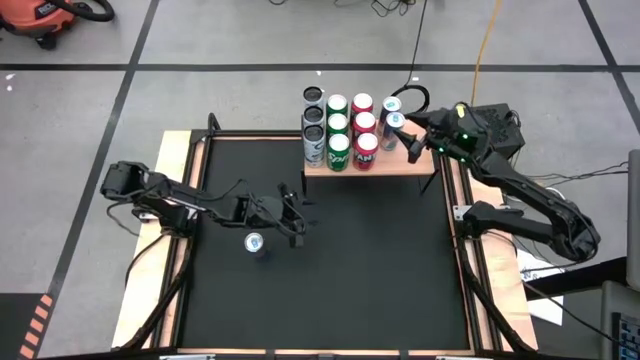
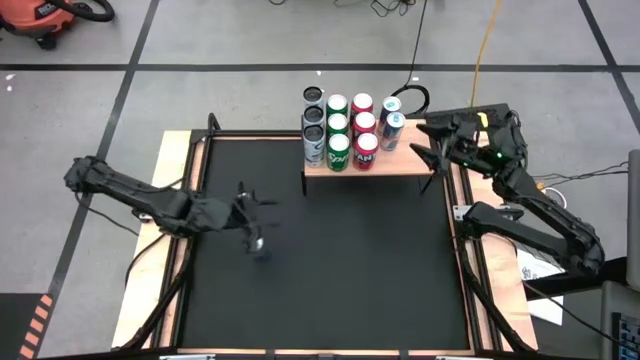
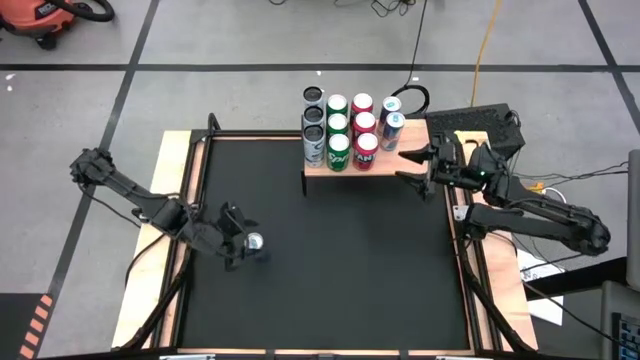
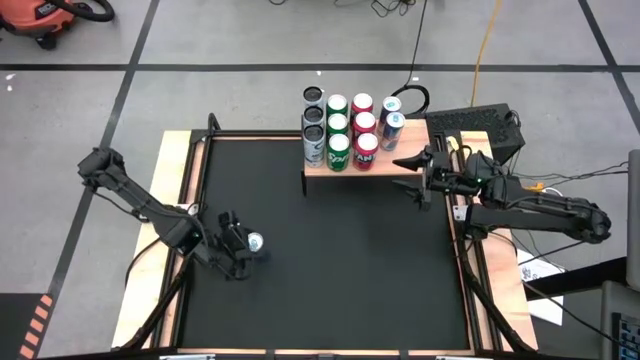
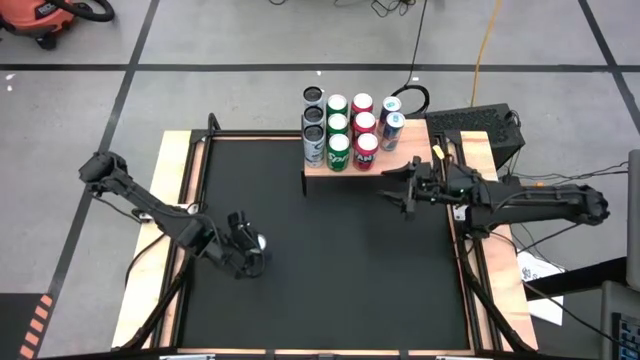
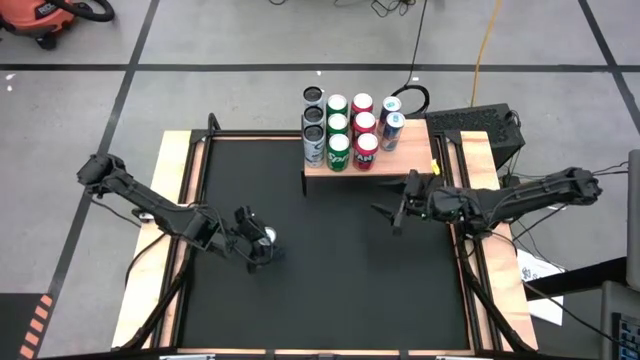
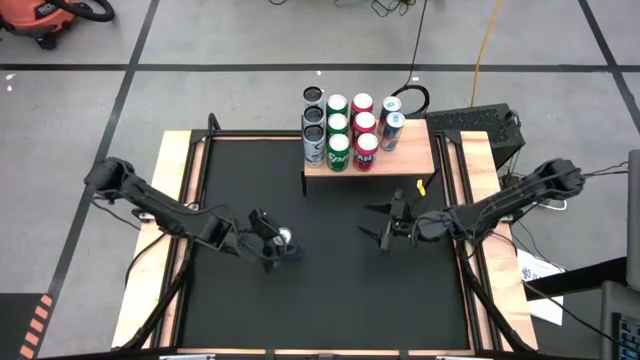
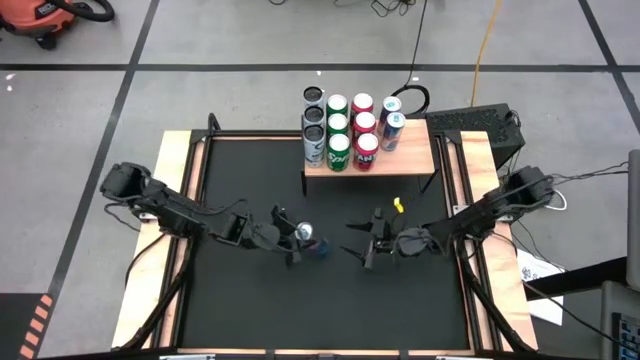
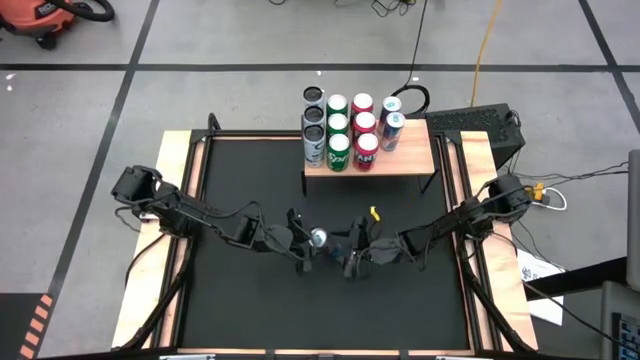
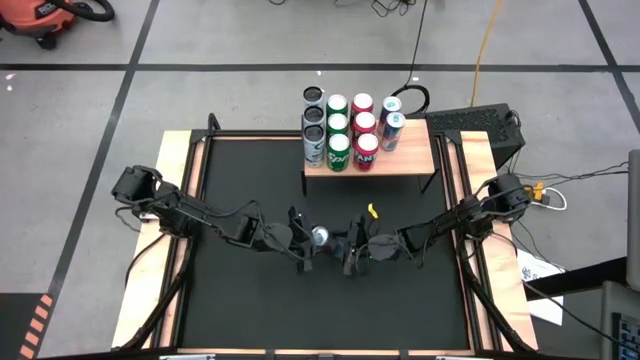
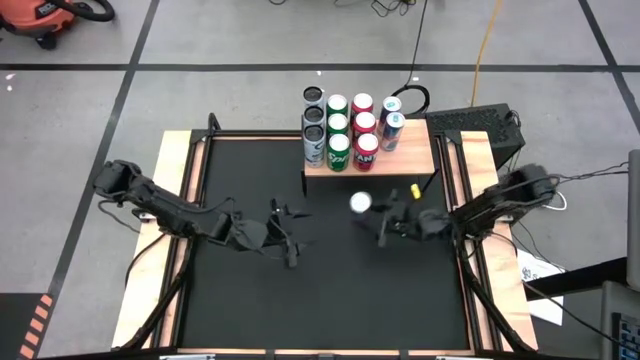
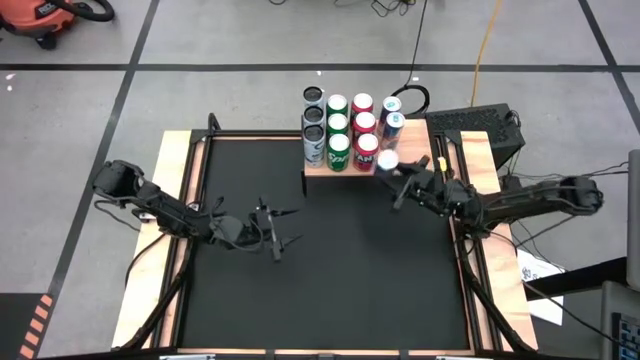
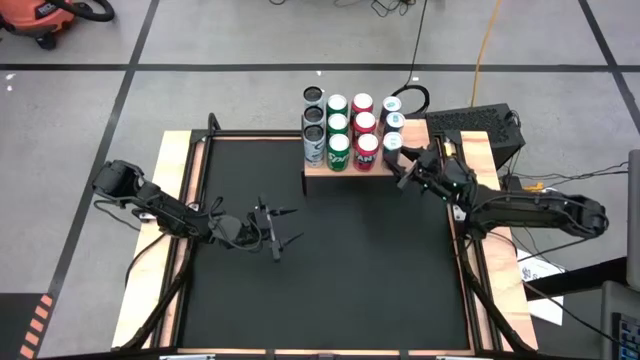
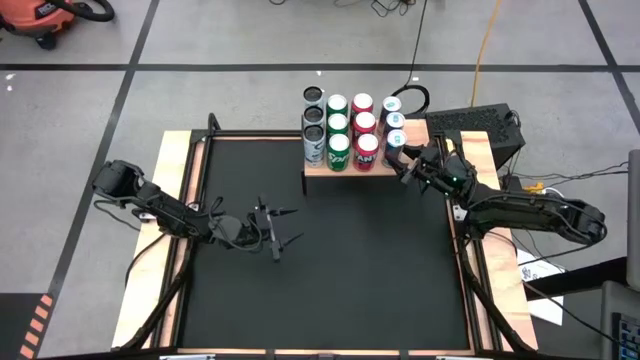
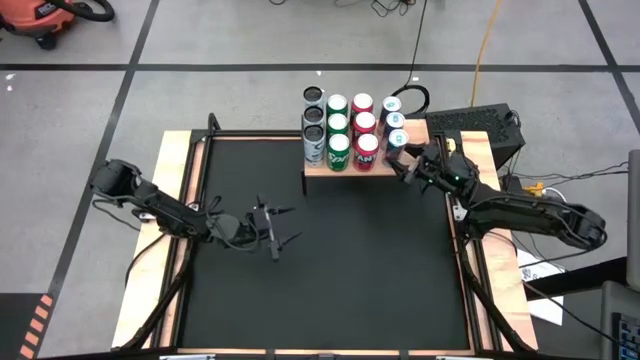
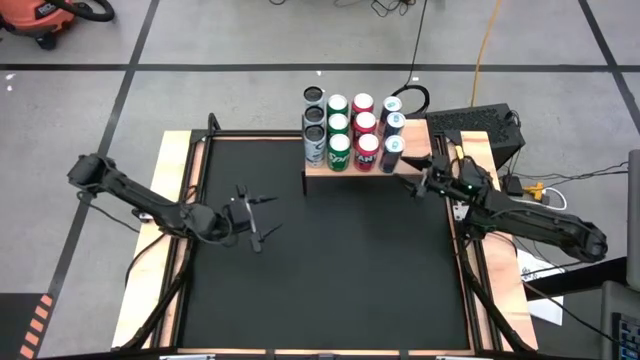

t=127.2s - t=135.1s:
Task: Place canned beverage on shelf
Put the blue soda can on the shelf aligned with the other blue soda can

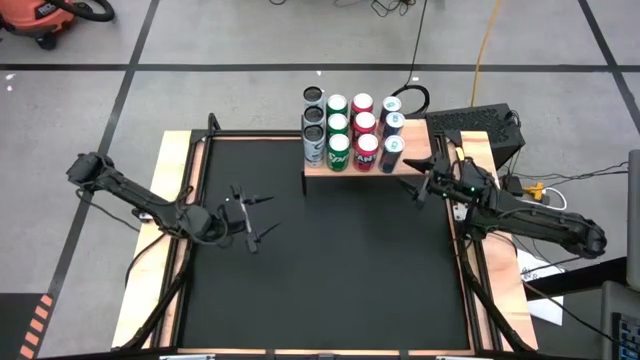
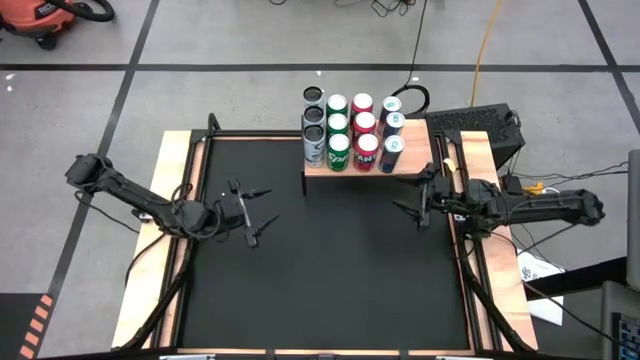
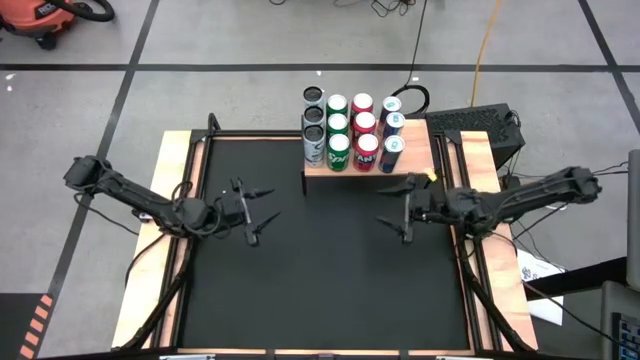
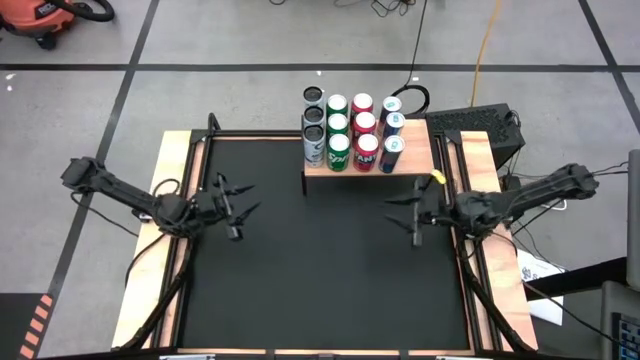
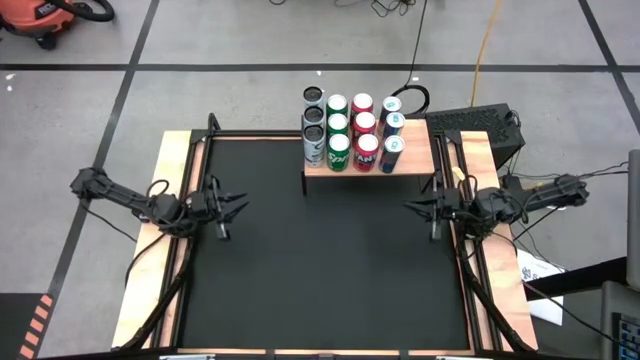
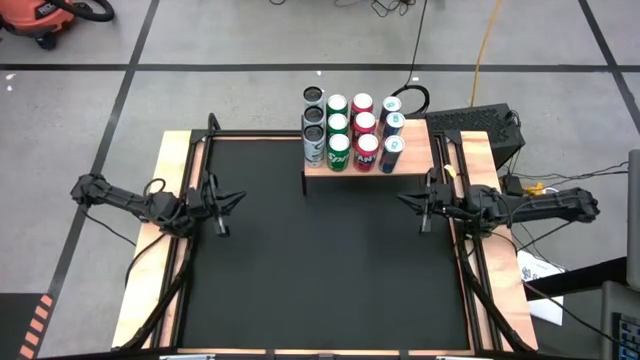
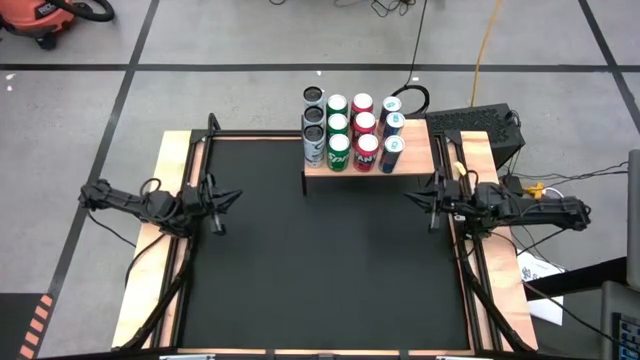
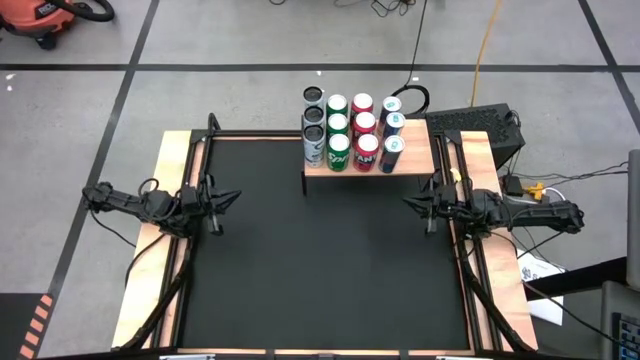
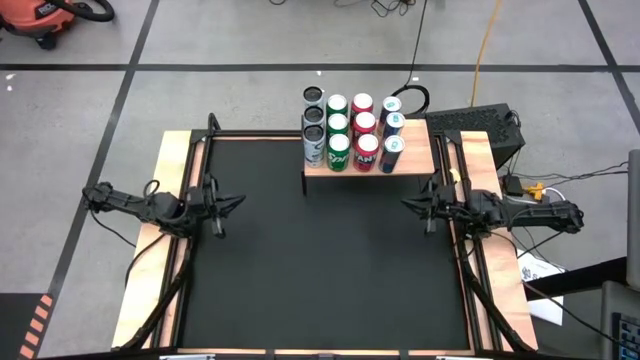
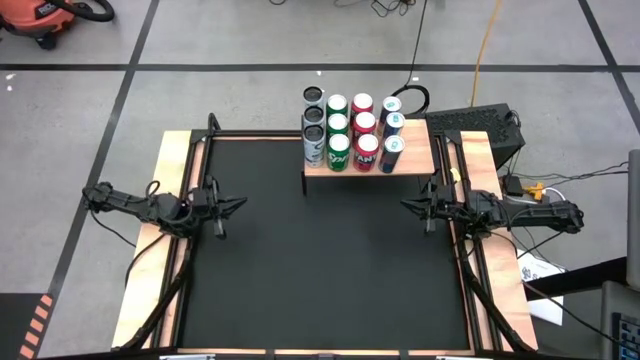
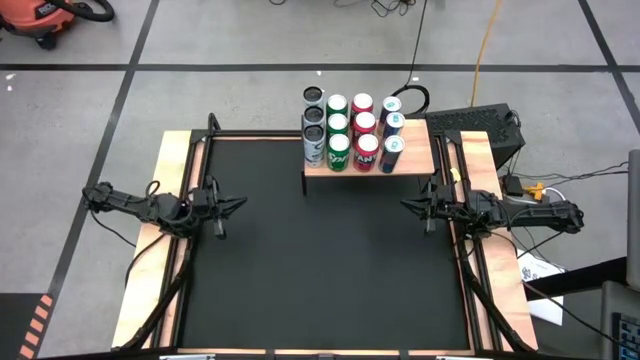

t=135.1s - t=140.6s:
Return to Home Position

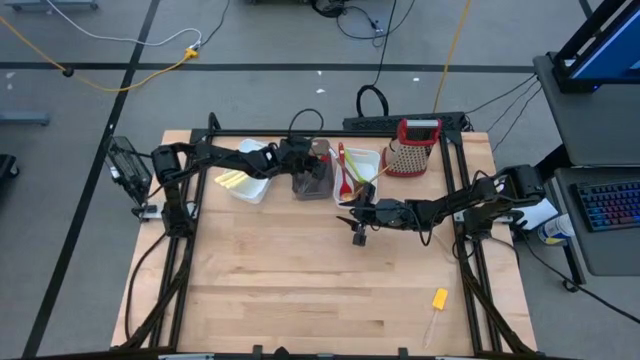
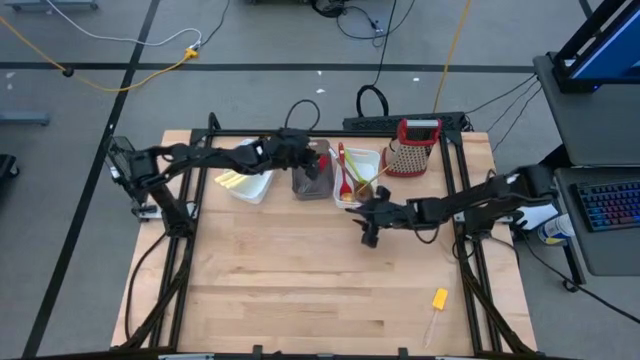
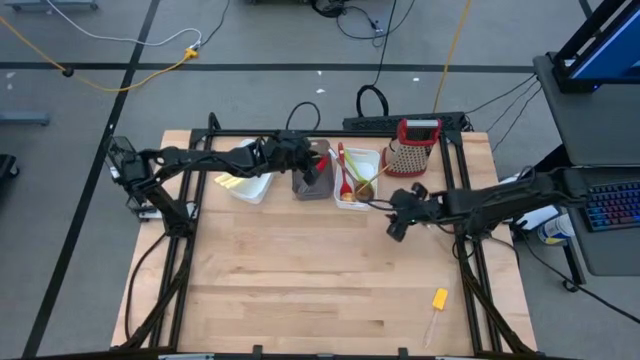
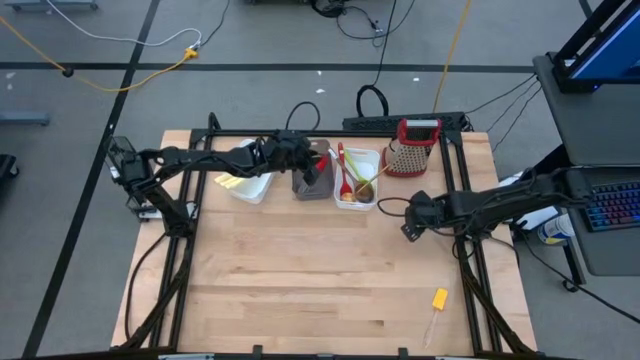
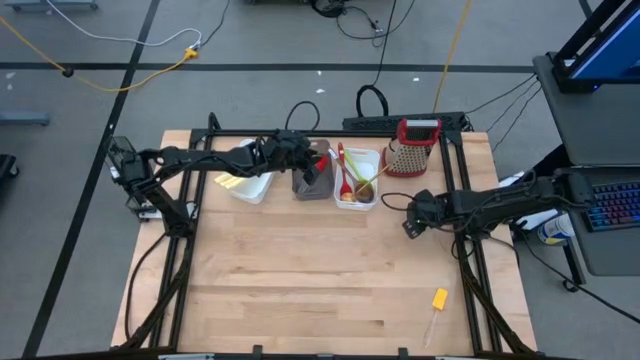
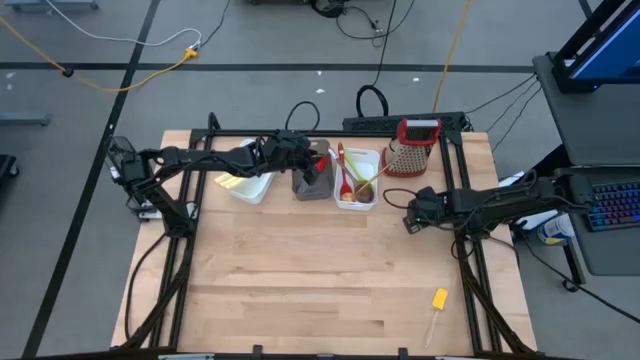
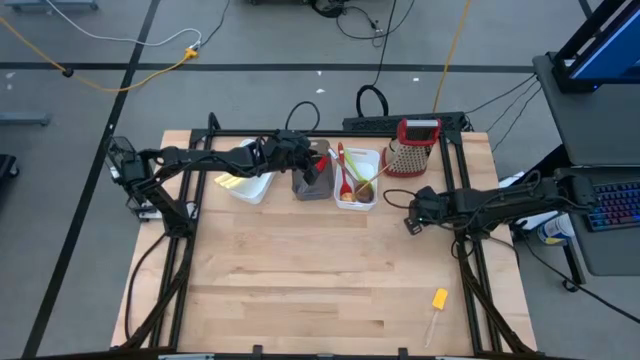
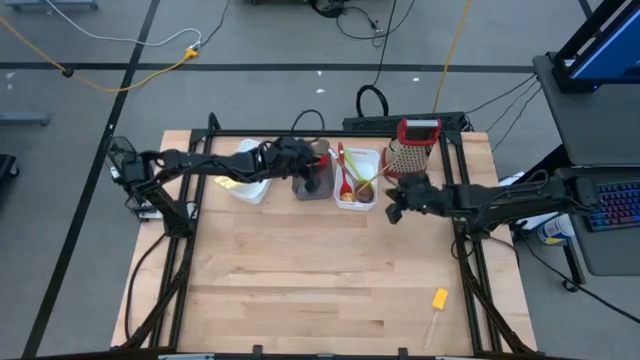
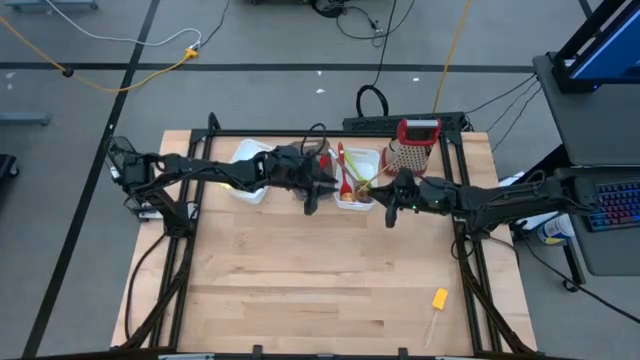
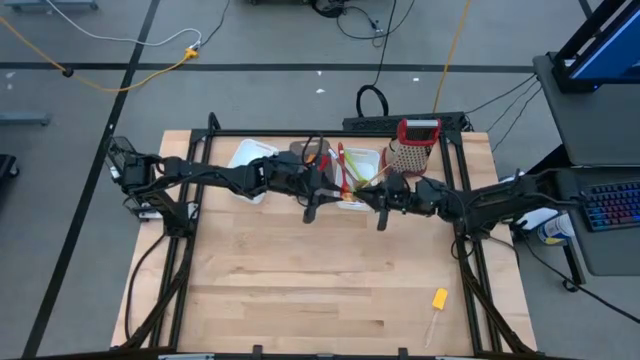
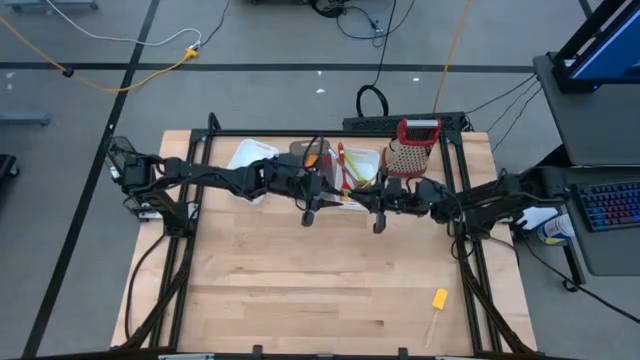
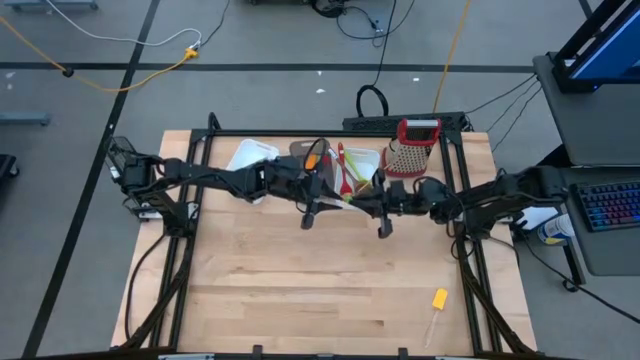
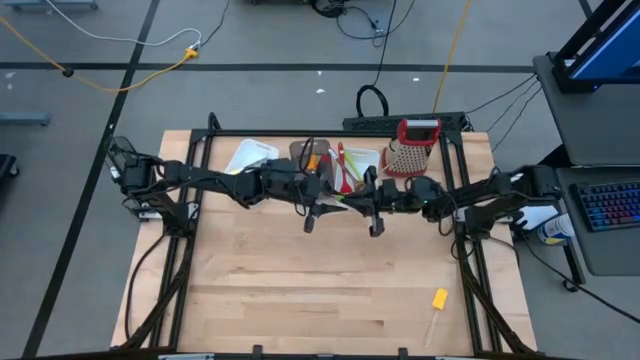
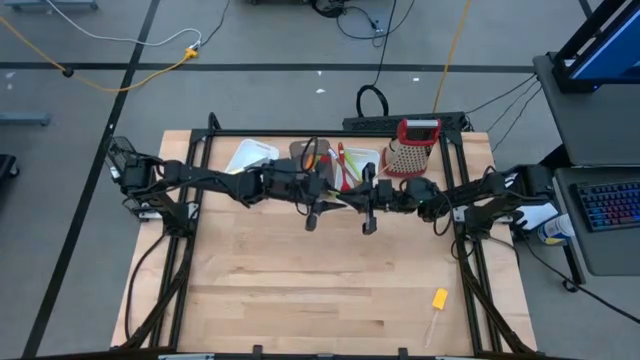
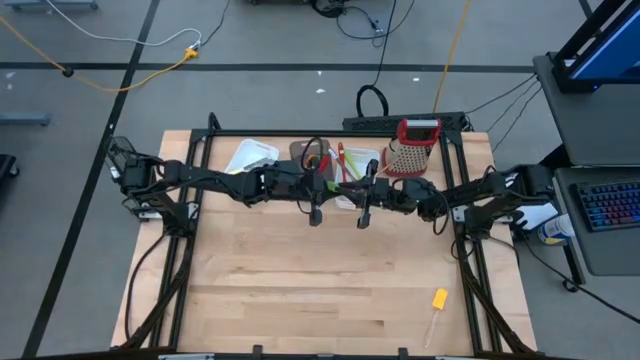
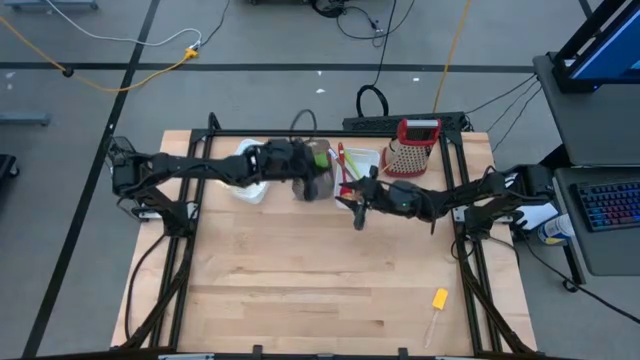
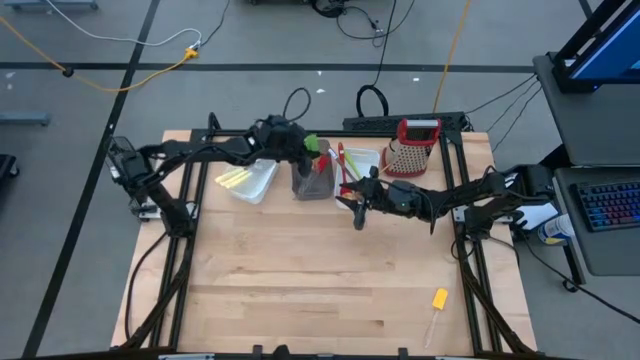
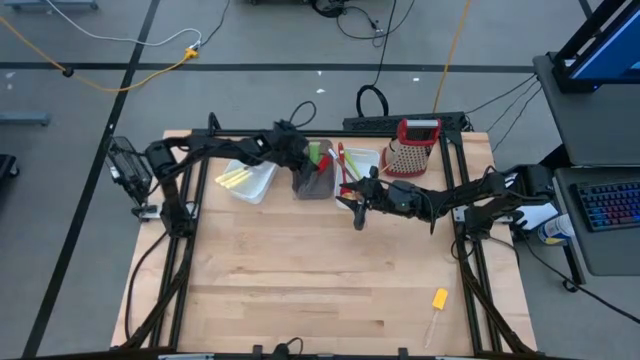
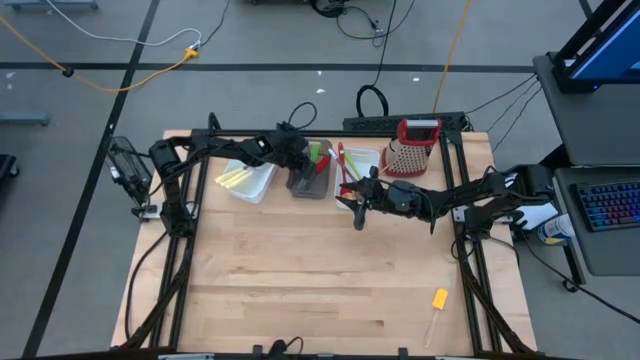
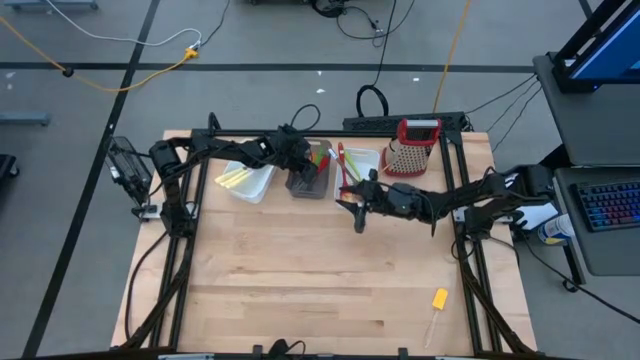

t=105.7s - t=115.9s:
Task: Pick & Place Kitchen Items
Put the green spatula into the black bin
